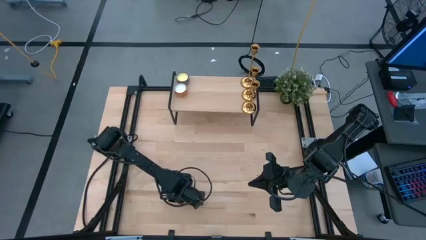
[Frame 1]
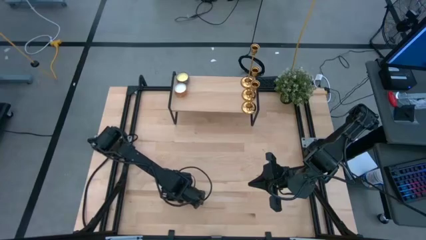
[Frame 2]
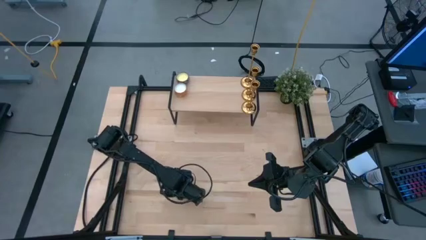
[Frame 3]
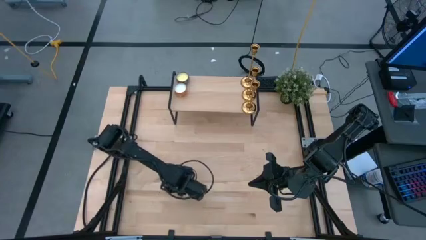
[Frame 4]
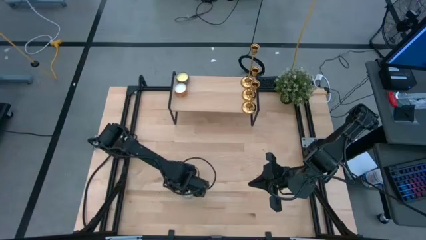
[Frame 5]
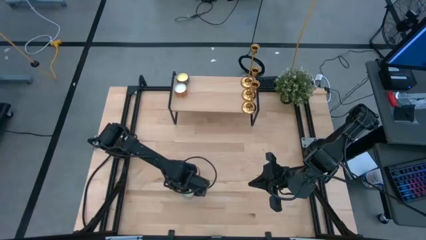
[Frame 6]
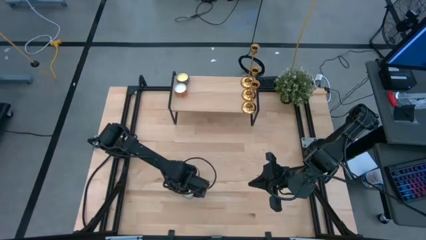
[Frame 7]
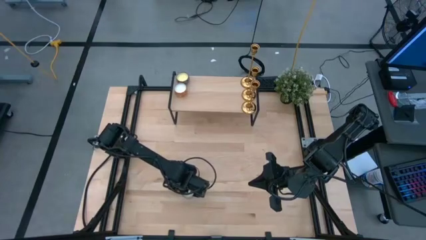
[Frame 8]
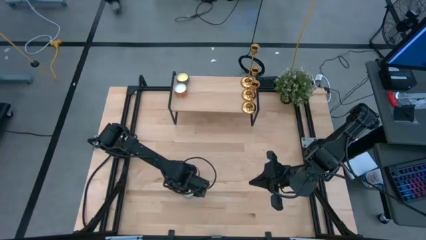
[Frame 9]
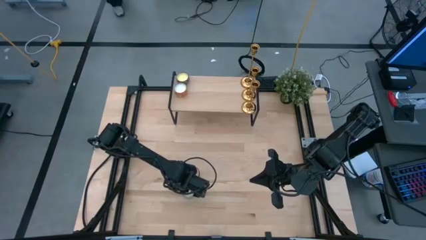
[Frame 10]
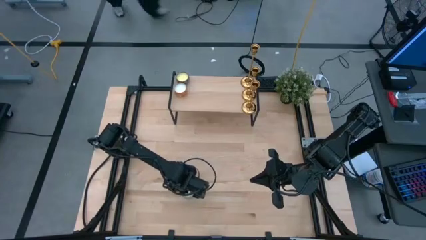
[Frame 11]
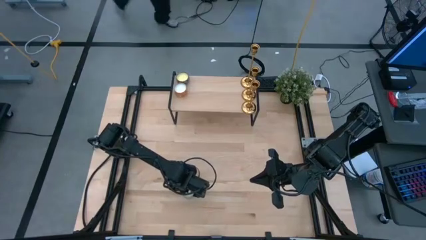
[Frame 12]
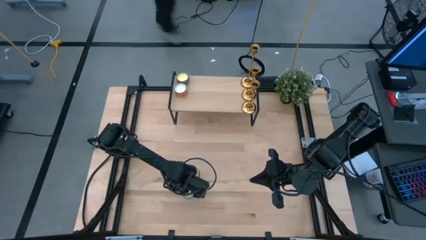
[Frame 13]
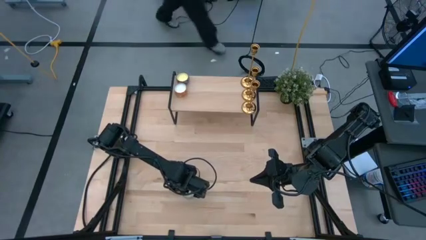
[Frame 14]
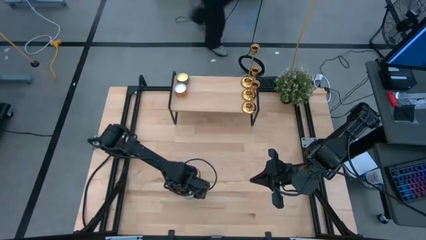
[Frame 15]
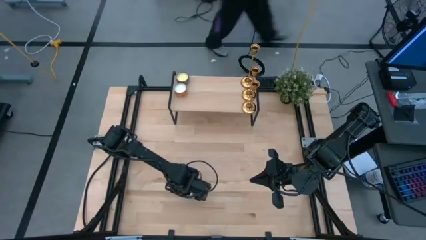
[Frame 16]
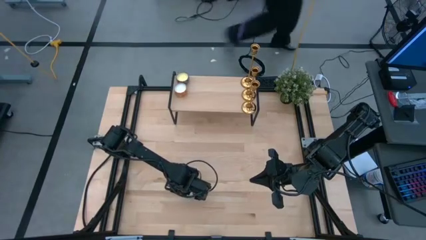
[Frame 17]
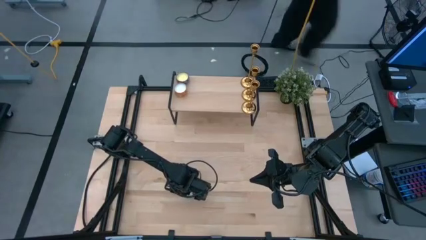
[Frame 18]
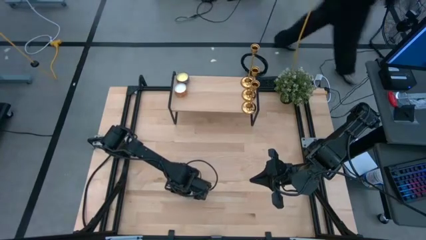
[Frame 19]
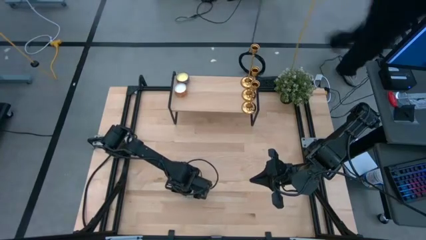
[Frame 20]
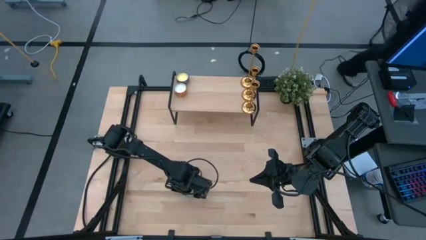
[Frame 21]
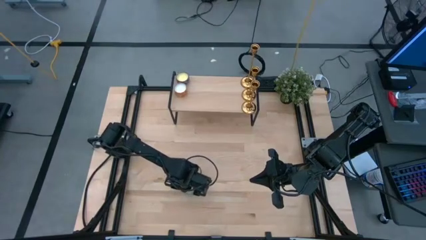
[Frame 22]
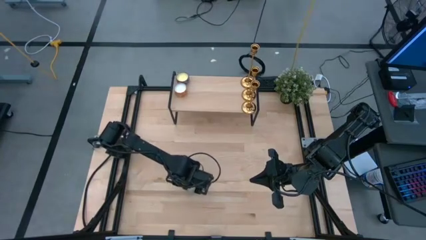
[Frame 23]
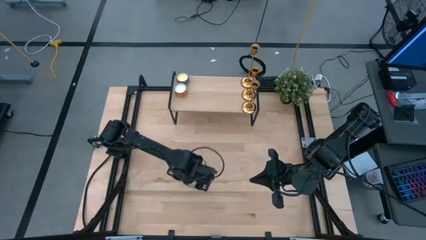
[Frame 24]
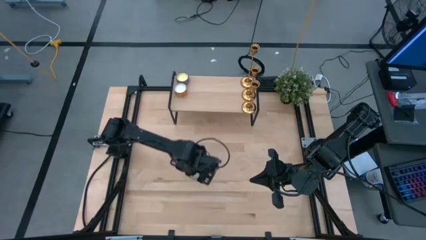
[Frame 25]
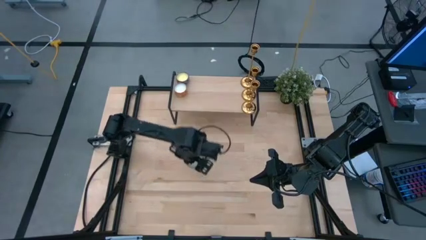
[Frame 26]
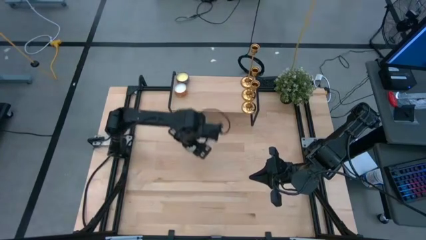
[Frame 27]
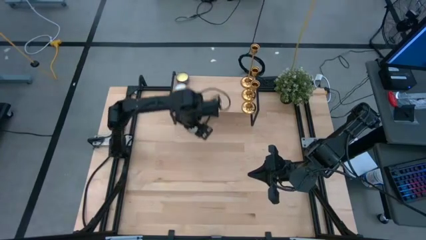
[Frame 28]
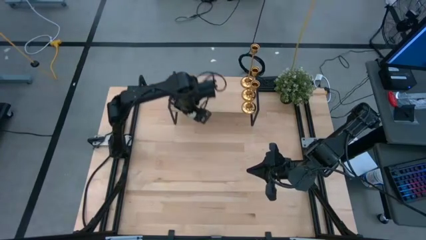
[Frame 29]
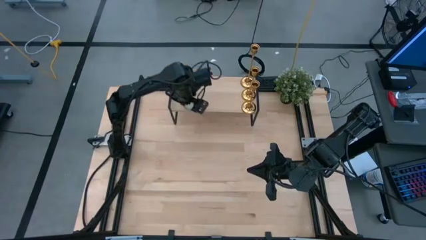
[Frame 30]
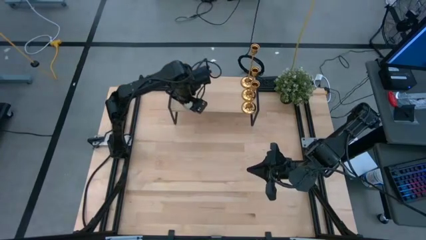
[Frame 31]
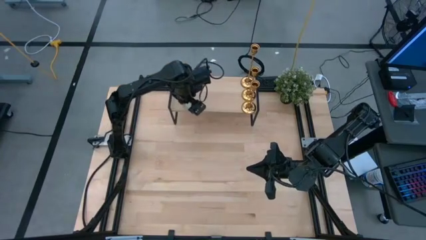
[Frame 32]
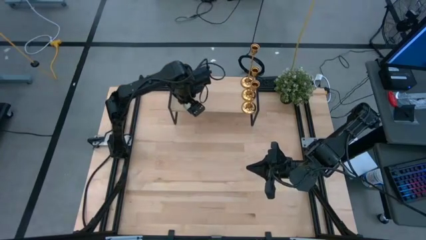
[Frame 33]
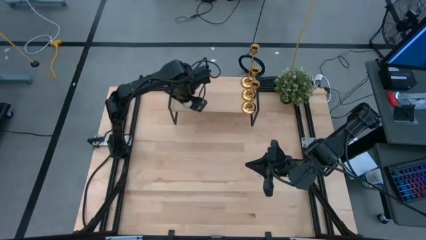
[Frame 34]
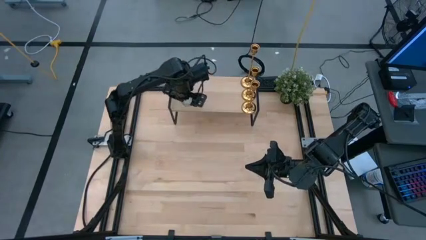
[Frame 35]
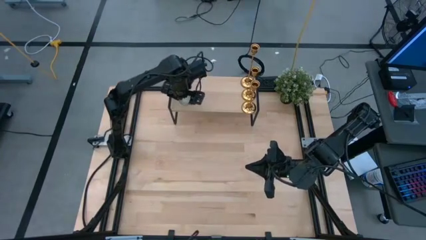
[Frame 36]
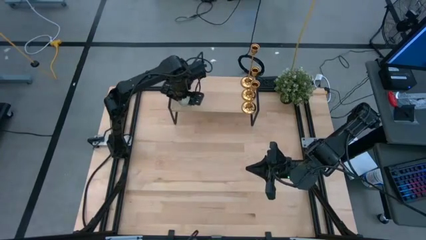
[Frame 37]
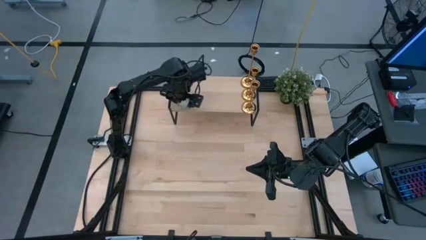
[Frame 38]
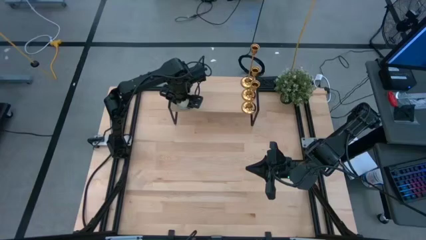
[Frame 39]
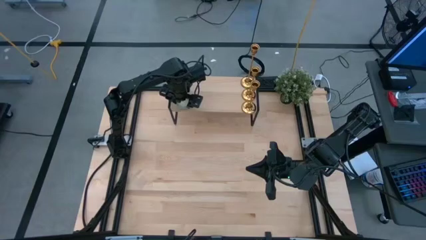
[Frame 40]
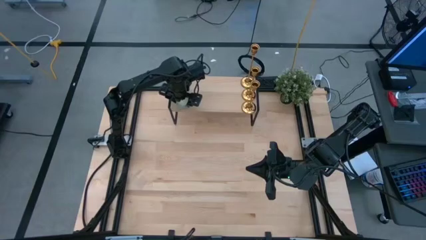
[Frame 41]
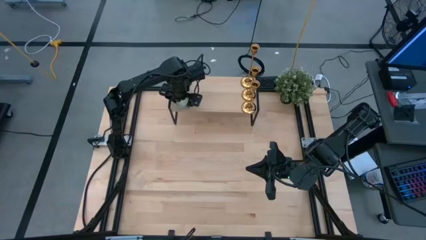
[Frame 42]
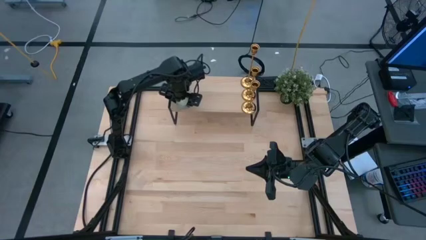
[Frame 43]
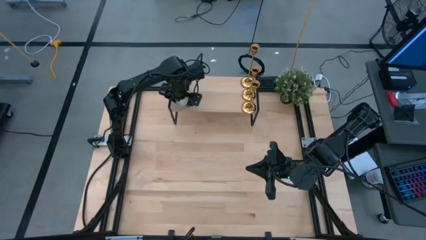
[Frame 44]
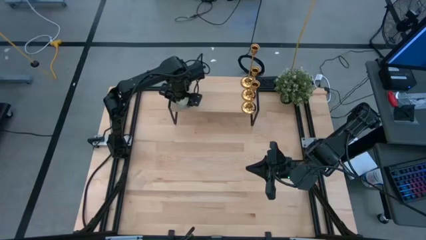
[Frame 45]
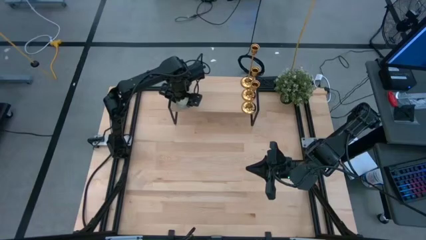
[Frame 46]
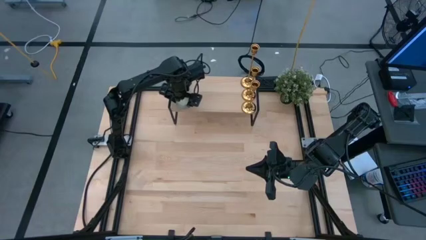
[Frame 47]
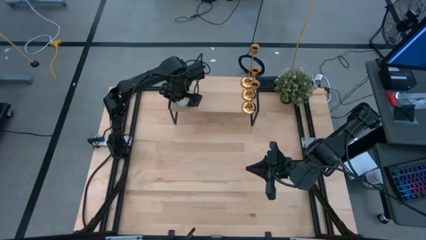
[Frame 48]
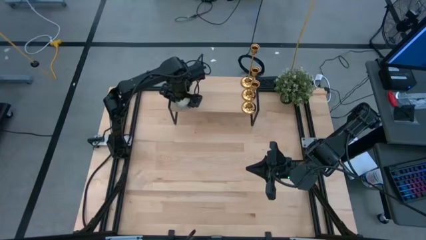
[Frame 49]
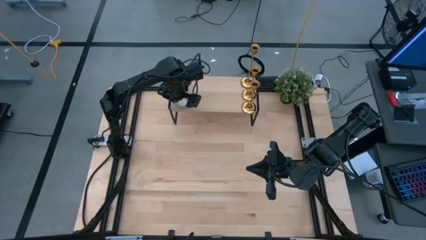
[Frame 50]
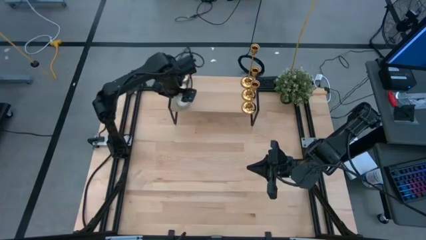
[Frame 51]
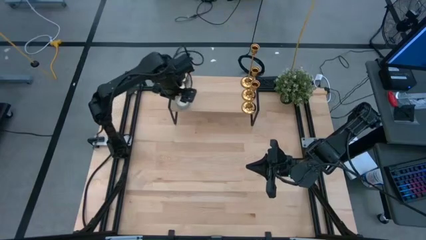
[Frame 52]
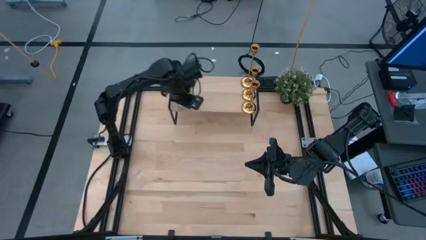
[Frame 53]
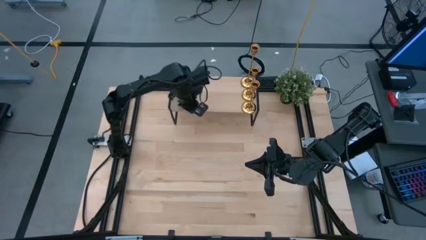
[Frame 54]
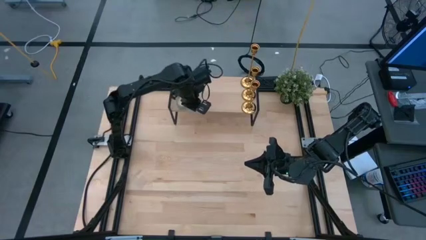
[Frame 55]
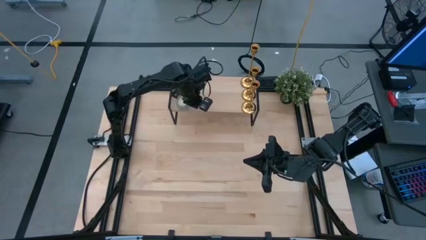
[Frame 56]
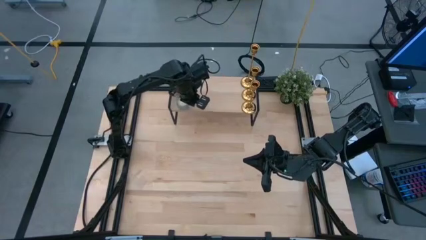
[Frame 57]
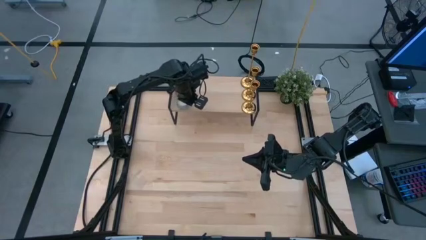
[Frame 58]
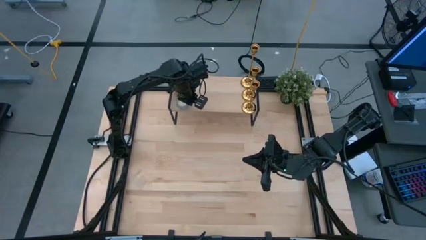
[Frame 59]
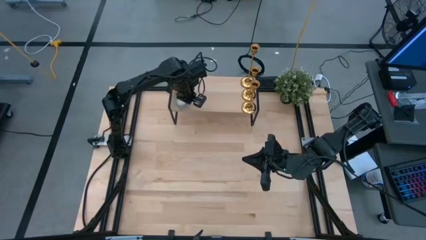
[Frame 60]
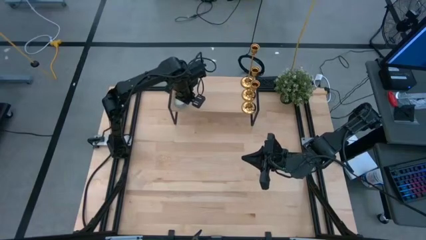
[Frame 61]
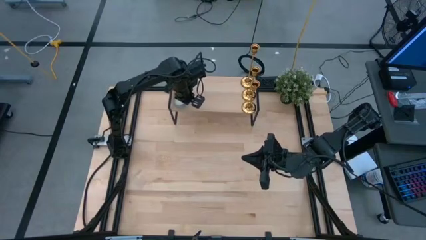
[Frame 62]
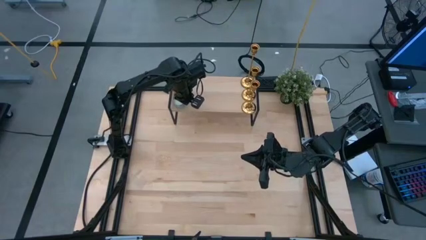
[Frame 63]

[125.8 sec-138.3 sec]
Task: Pick & Place candle stick holders
Put the white patterned scented candle on the shelf aligned with the yellow patterned scented candle
